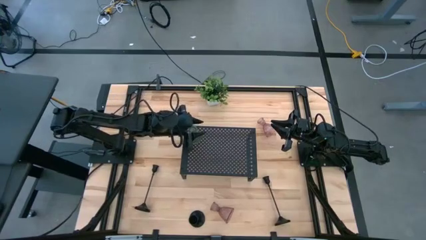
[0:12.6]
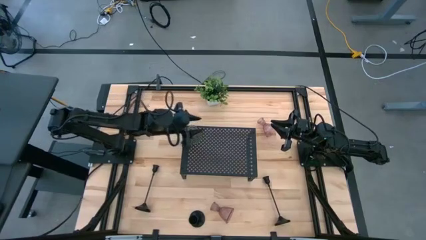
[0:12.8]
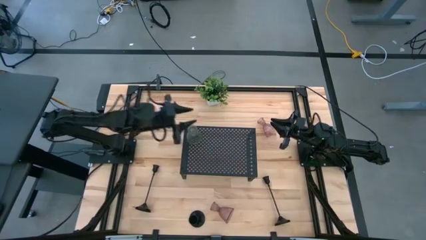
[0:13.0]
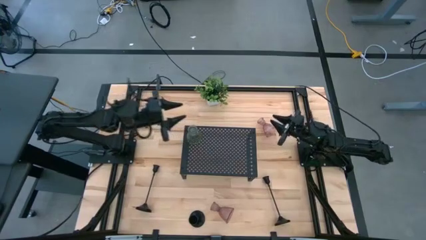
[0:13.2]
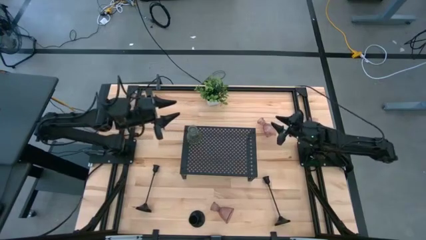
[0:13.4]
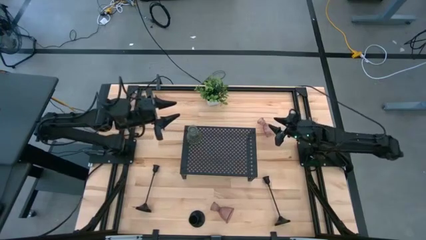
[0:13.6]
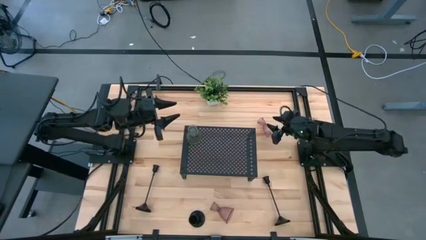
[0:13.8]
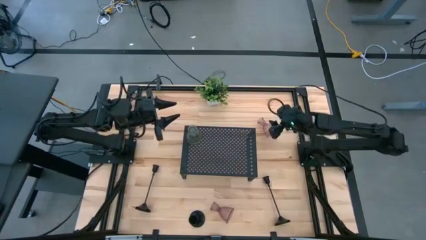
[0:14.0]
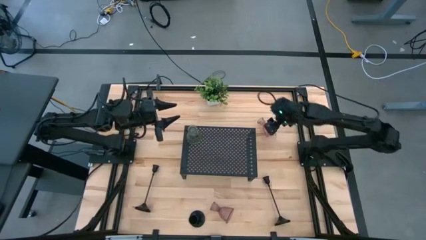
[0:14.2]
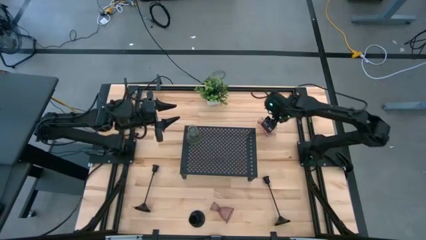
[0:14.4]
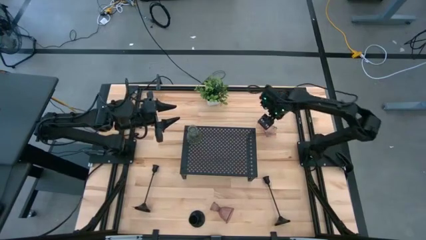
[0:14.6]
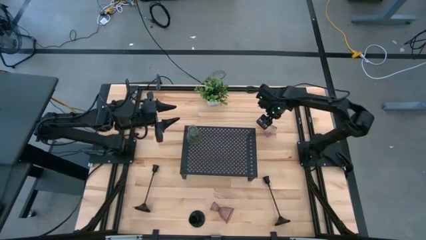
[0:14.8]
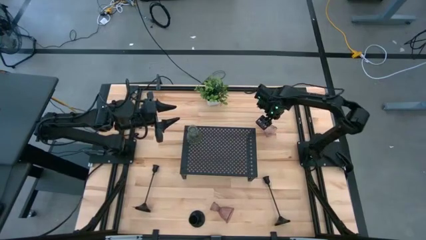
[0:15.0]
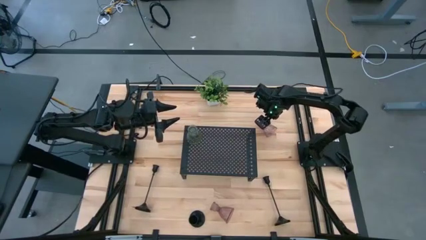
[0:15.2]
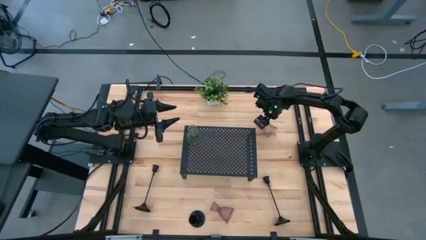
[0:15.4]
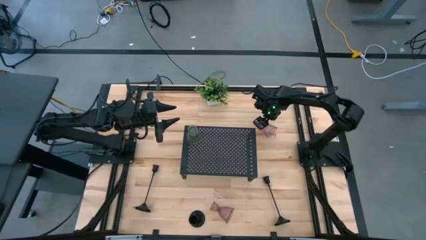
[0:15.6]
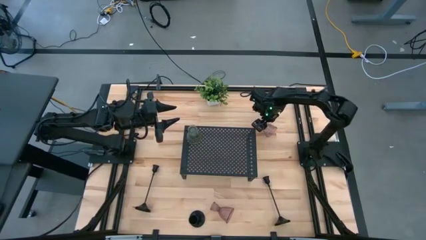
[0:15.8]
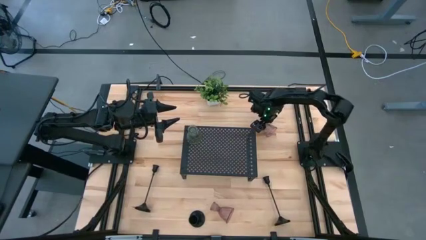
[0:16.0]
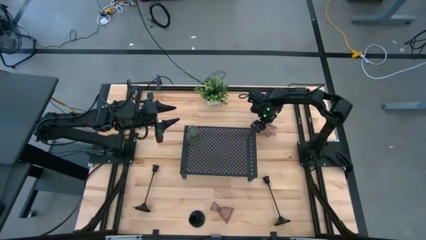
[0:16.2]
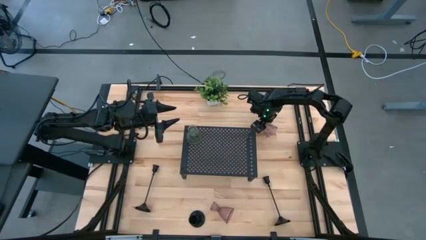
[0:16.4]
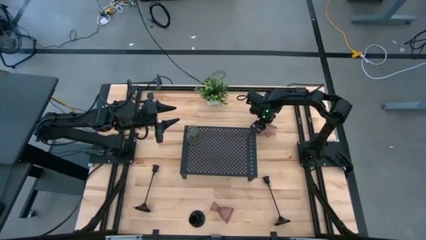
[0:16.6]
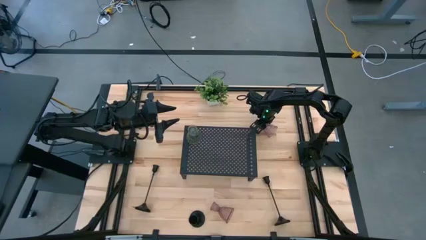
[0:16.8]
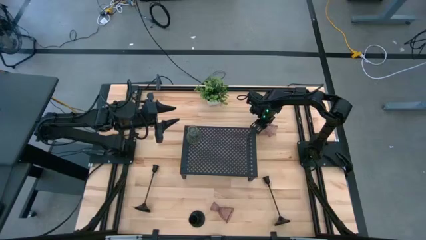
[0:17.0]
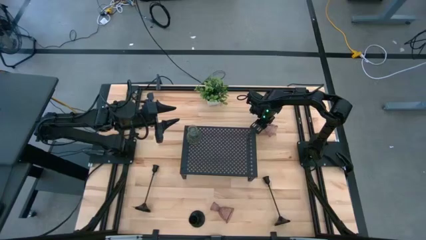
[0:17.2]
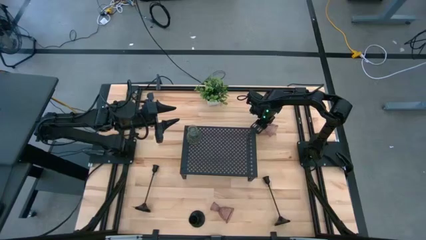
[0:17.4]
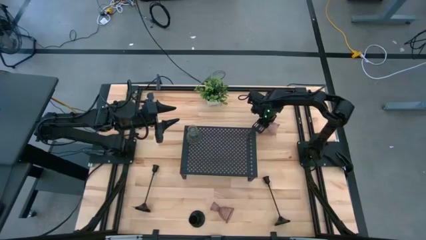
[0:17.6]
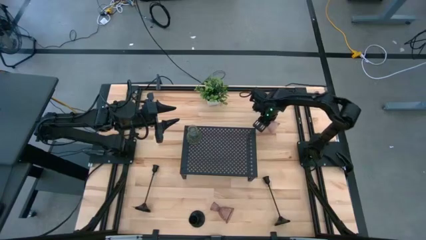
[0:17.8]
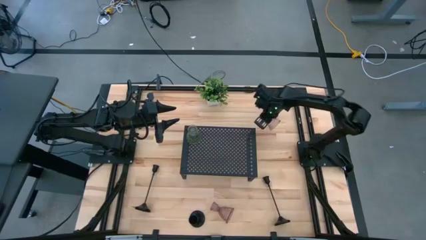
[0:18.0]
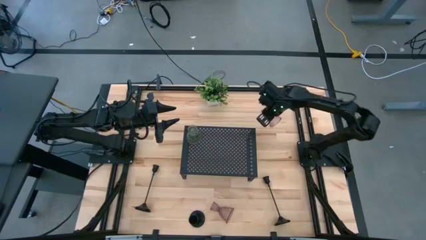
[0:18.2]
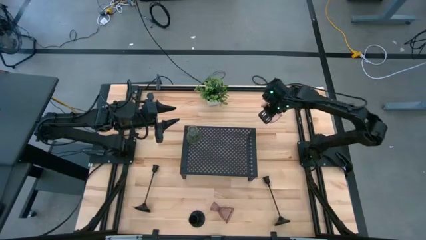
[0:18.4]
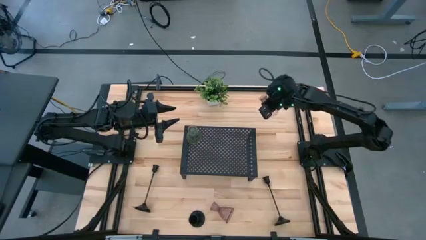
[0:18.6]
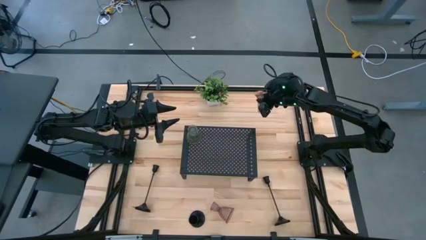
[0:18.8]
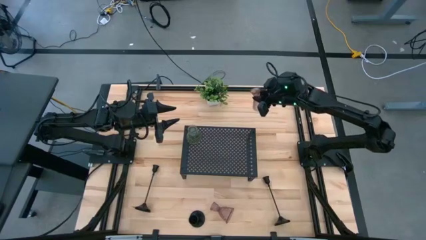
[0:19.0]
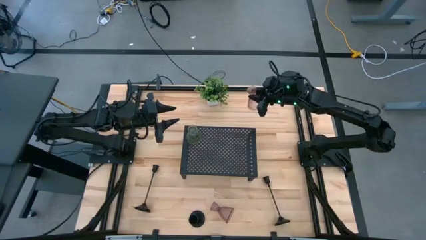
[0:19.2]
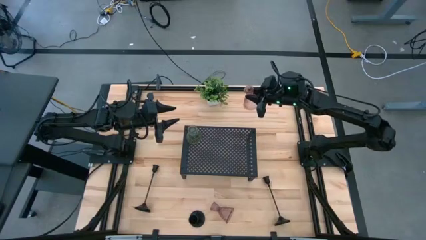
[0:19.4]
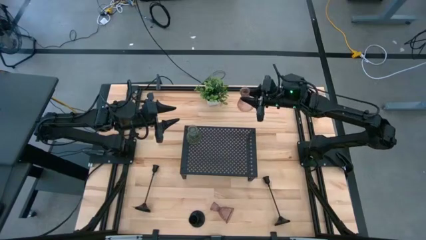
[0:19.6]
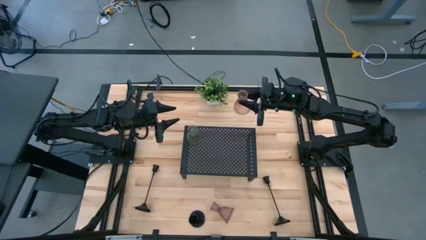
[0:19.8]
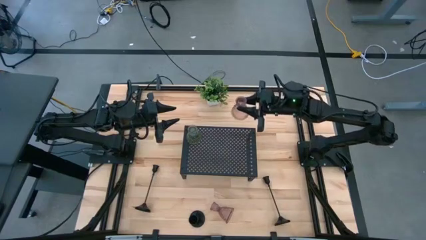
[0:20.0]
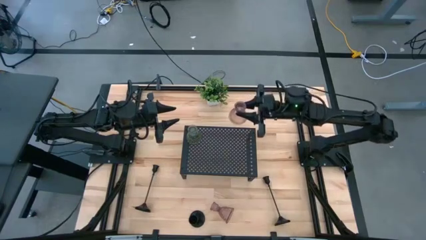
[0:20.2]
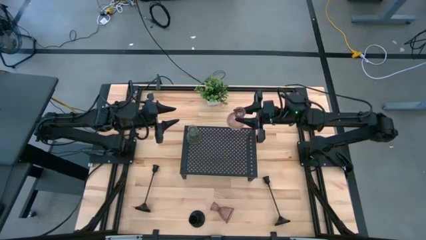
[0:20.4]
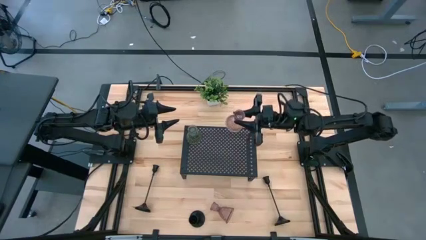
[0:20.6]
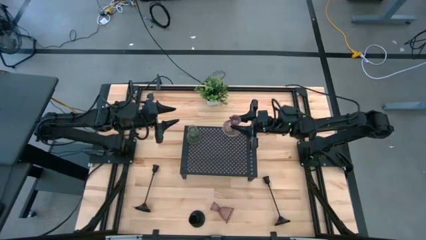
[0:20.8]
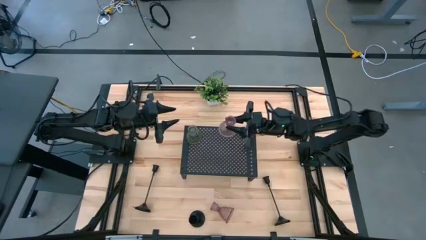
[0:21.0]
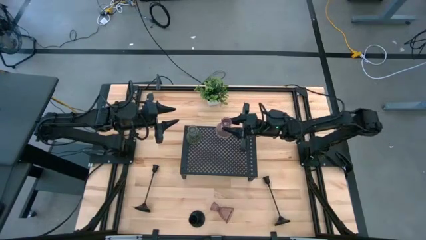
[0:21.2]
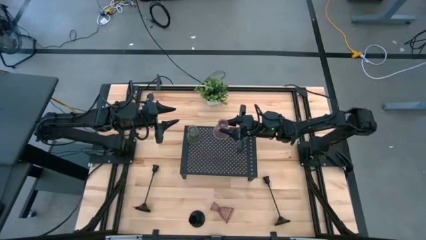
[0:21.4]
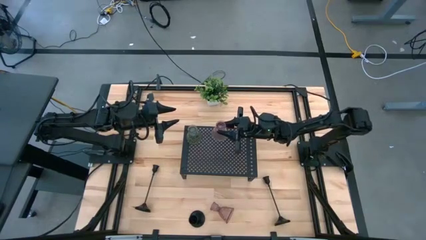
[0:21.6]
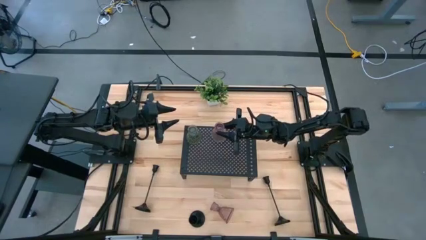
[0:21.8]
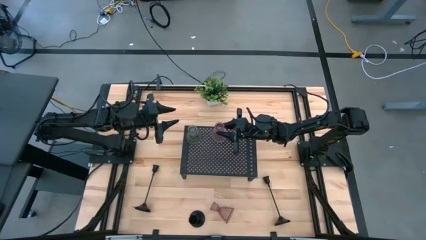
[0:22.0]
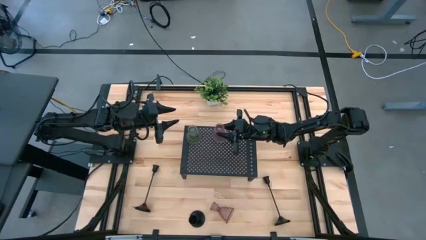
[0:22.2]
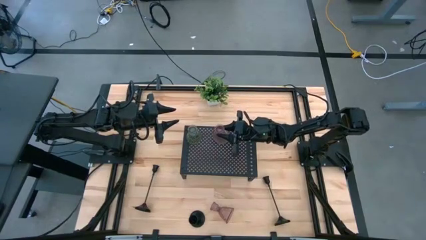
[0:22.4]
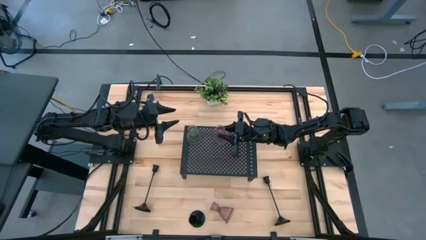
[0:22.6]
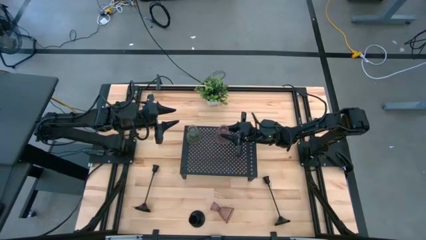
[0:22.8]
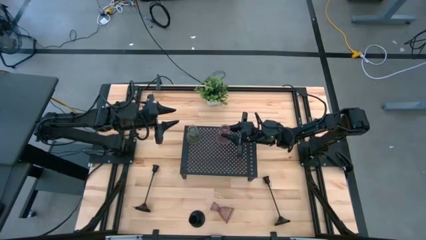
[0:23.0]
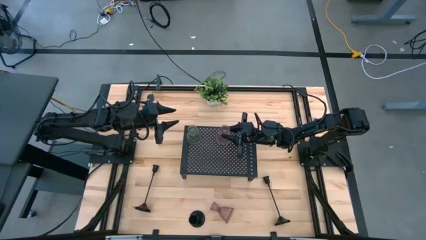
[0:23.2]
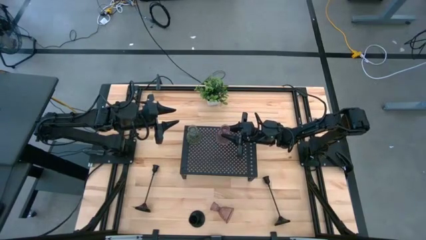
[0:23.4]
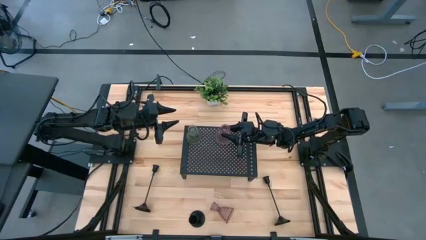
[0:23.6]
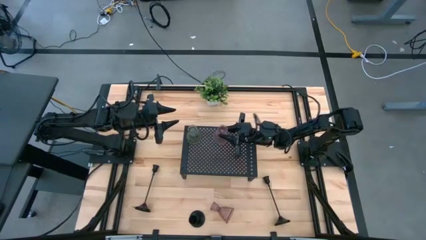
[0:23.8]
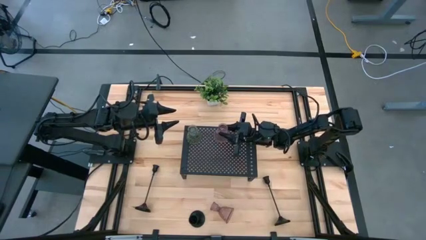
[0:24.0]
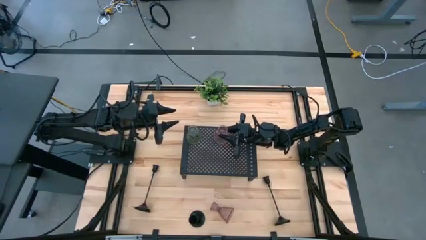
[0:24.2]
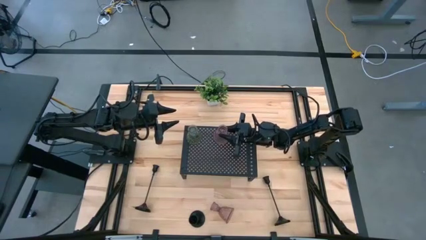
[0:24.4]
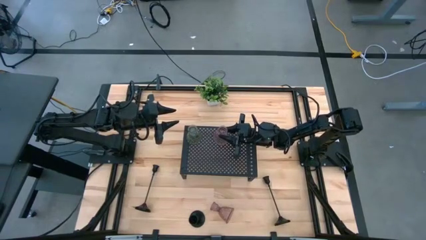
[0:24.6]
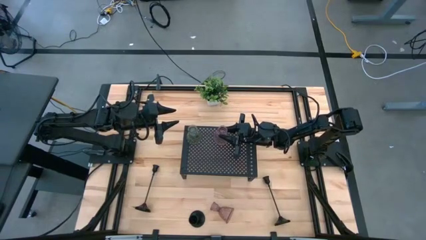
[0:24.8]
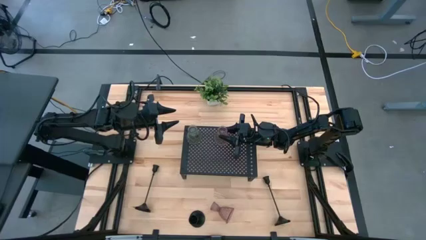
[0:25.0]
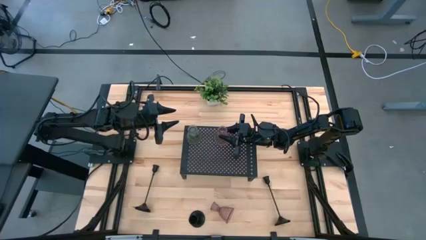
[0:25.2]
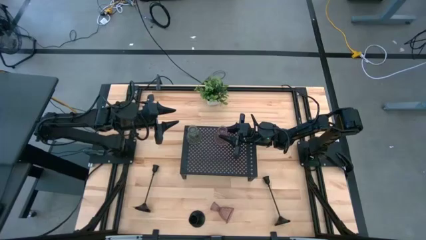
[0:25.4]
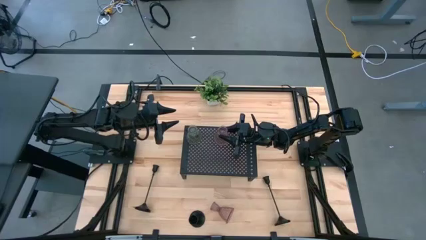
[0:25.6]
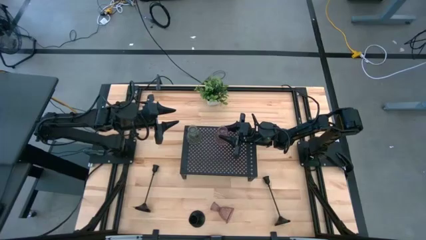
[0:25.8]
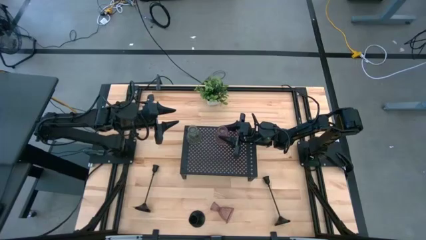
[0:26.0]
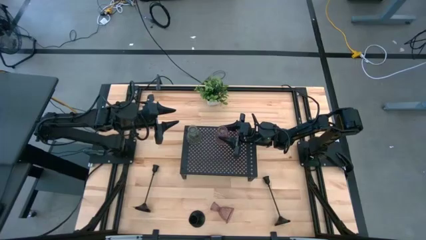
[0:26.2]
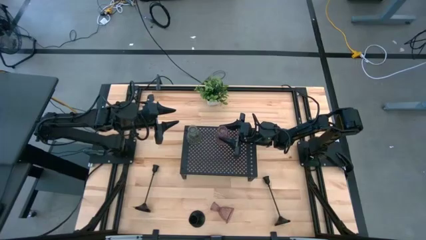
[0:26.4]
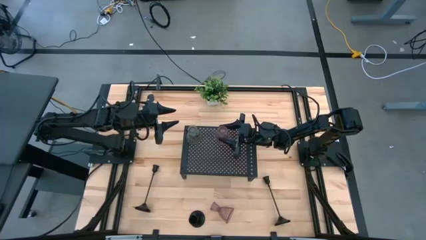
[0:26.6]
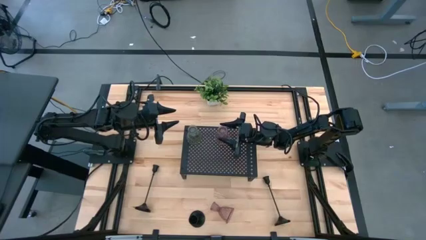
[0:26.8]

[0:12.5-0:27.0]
Task: Pick & Place candle stick holders
Put the top right pink glass candle holder on the shelf aligned with the other glass candle holder

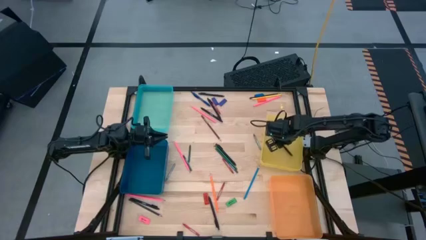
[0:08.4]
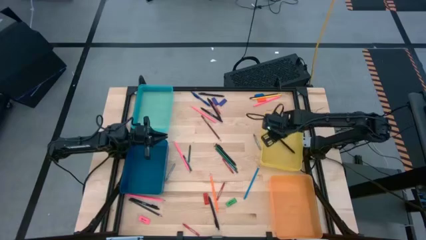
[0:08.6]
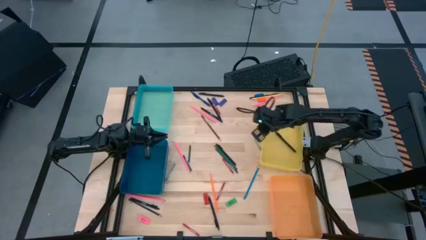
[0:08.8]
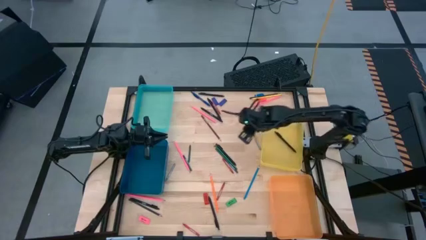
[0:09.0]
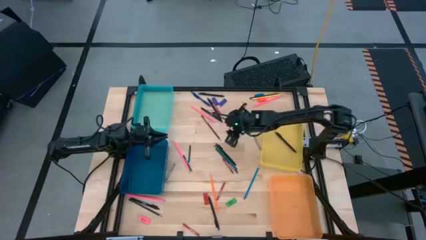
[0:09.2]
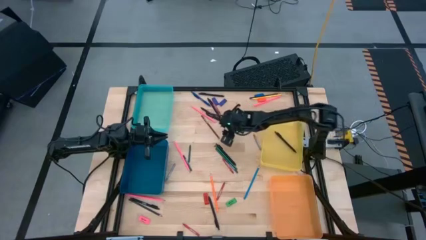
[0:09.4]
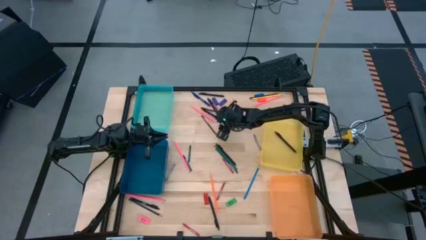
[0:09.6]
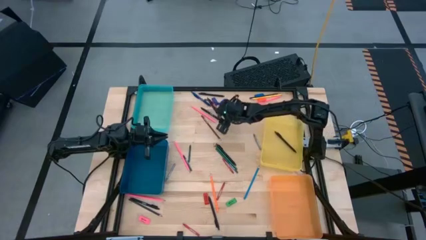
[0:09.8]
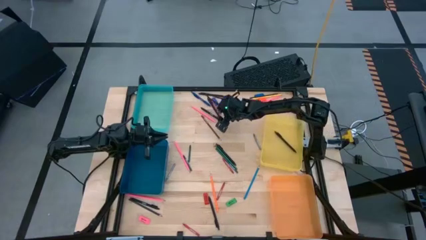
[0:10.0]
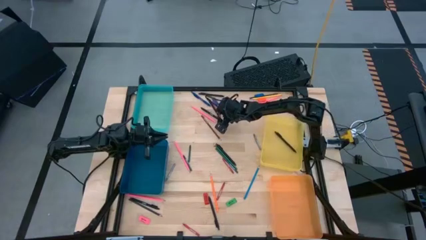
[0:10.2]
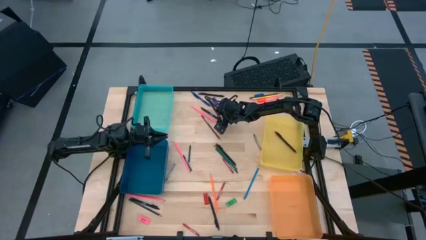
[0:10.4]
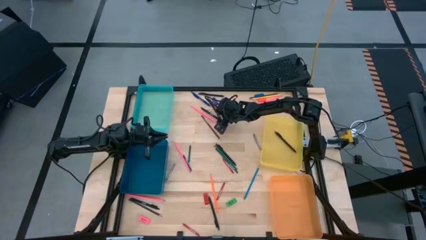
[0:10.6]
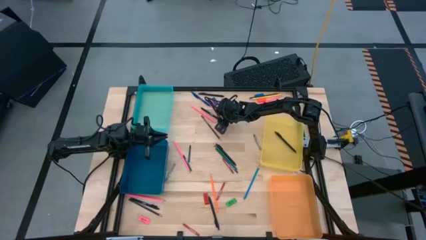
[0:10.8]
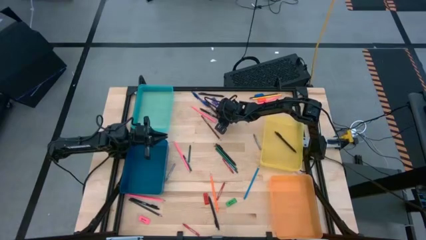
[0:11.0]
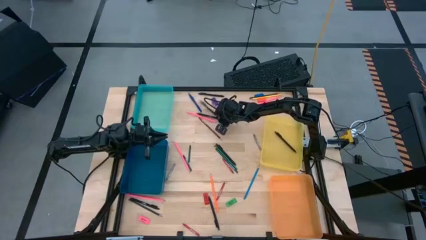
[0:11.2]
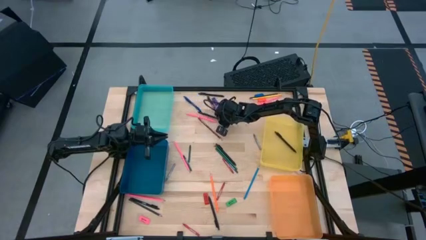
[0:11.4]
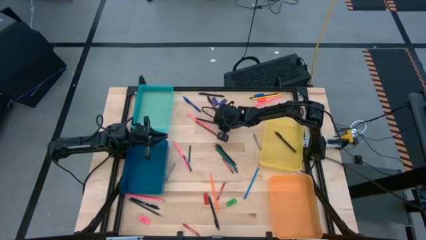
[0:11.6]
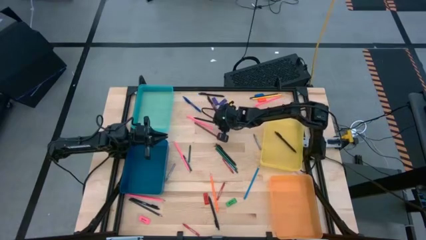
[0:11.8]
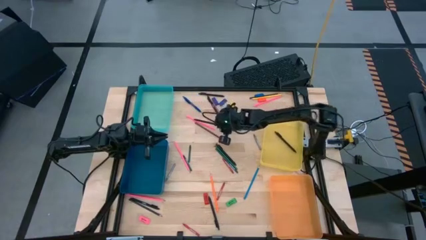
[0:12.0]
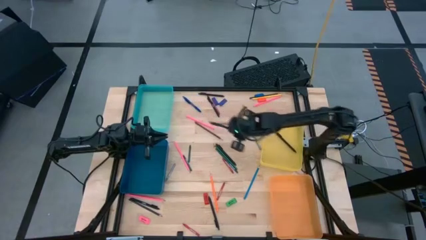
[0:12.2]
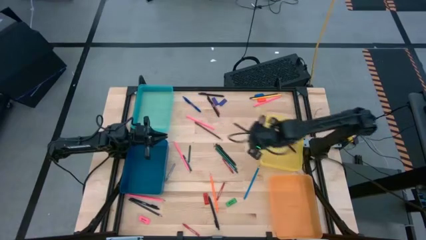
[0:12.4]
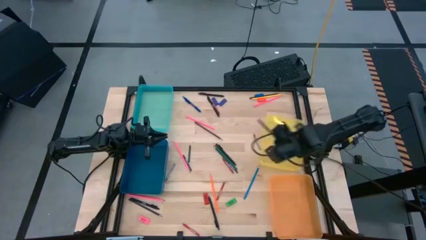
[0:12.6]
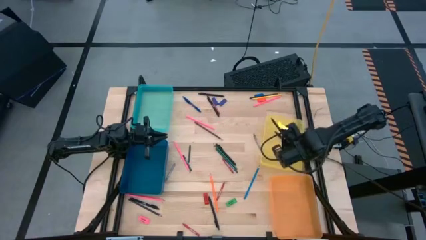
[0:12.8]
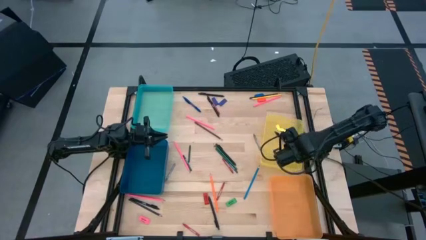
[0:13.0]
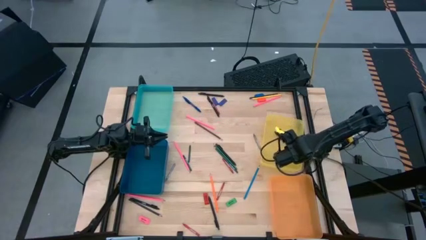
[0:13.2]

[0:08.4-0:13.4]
Task: Sort crayons/erasers/pens/pencils in bins
Put the black pen into the yellow bin
